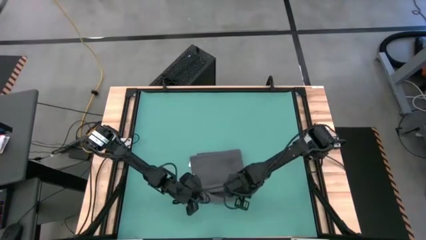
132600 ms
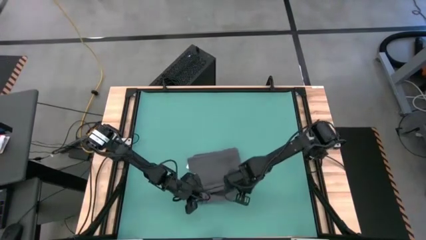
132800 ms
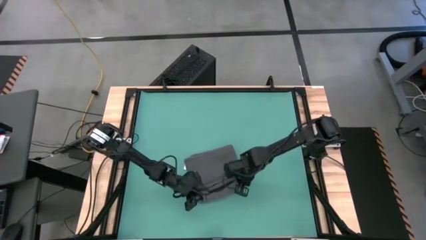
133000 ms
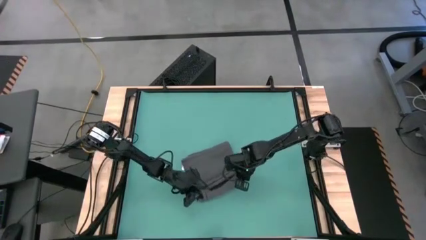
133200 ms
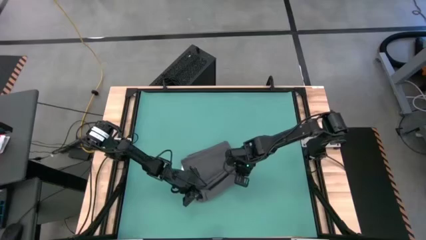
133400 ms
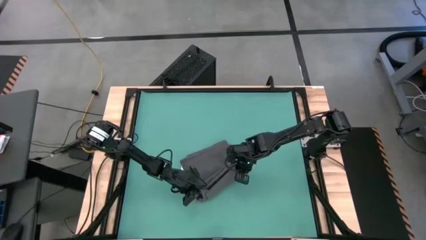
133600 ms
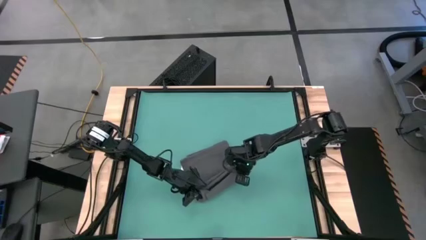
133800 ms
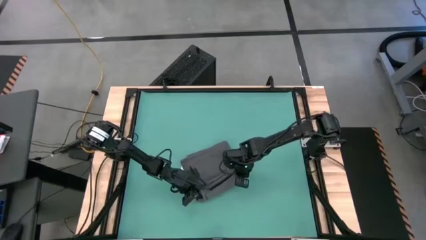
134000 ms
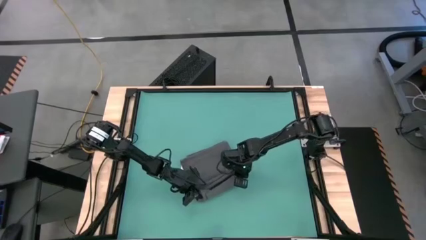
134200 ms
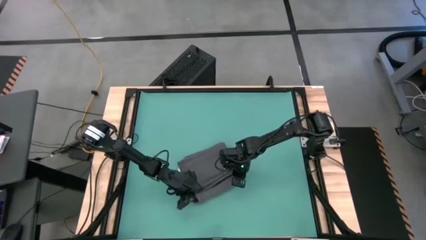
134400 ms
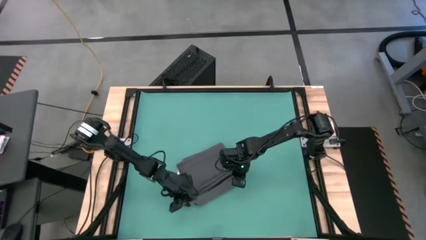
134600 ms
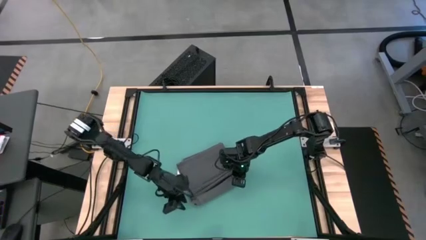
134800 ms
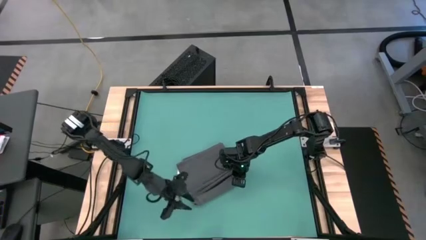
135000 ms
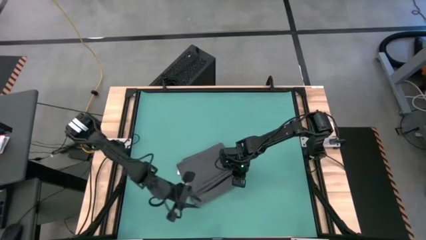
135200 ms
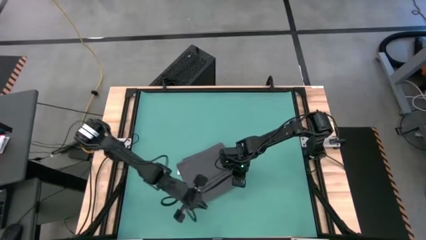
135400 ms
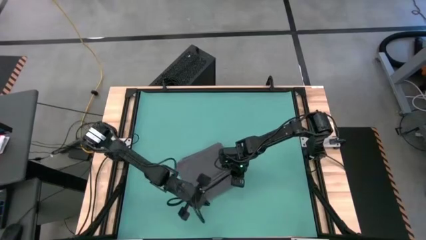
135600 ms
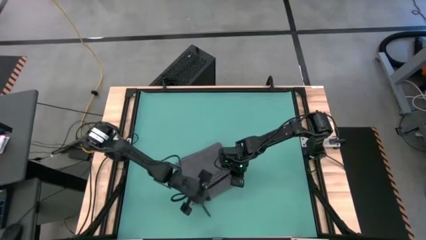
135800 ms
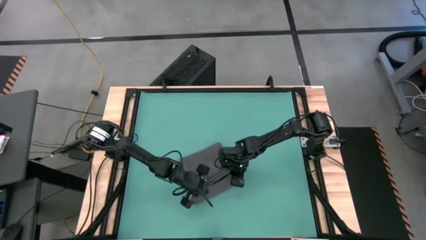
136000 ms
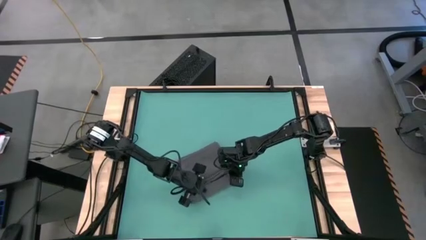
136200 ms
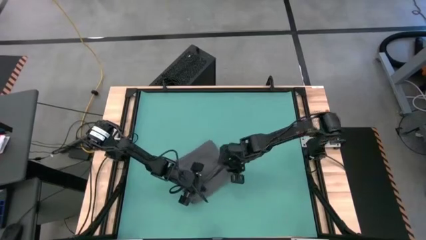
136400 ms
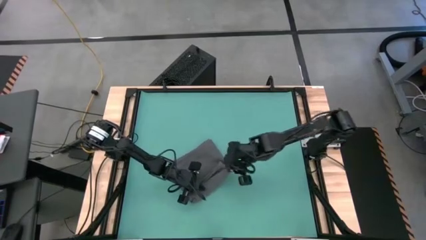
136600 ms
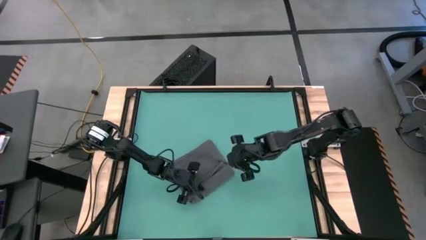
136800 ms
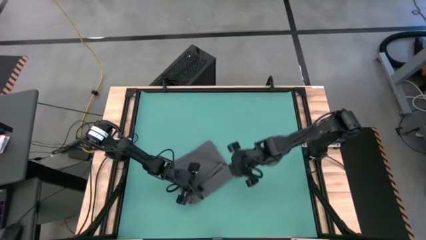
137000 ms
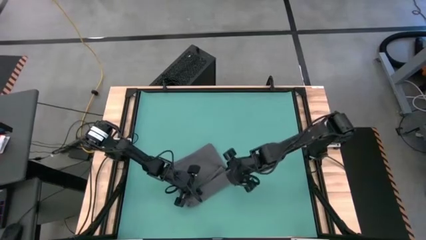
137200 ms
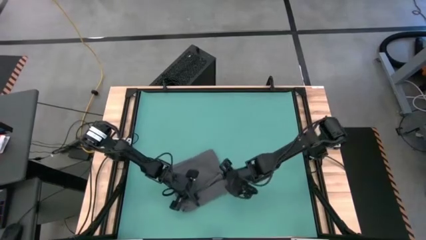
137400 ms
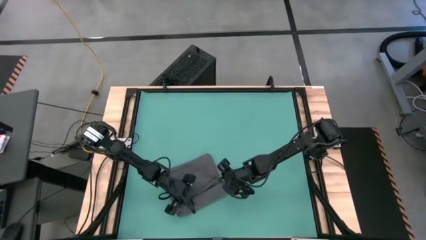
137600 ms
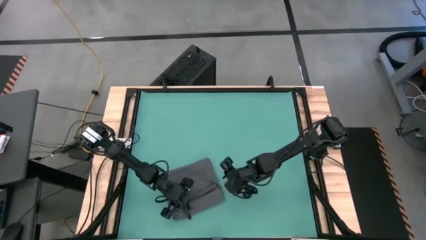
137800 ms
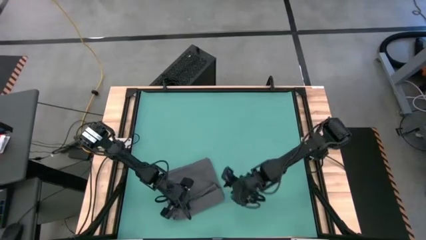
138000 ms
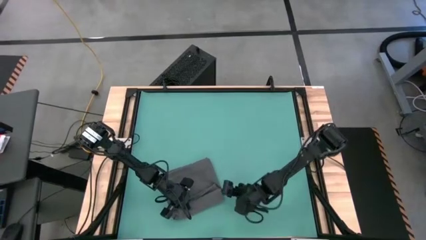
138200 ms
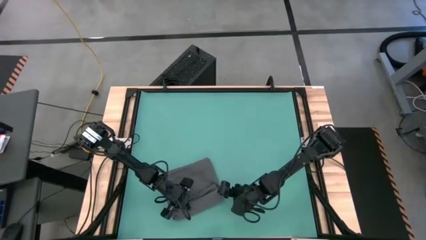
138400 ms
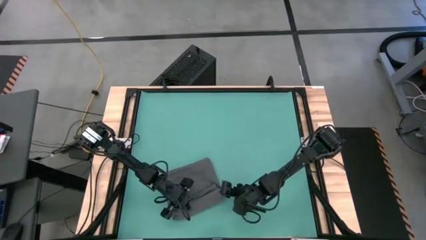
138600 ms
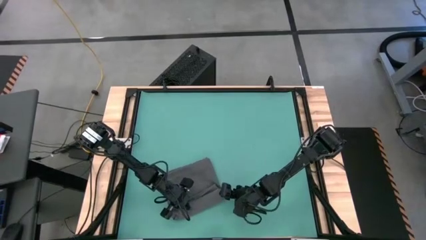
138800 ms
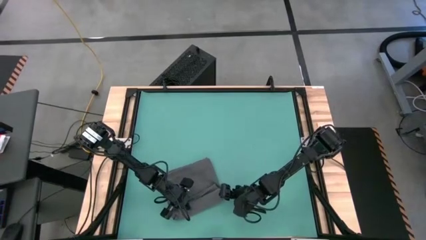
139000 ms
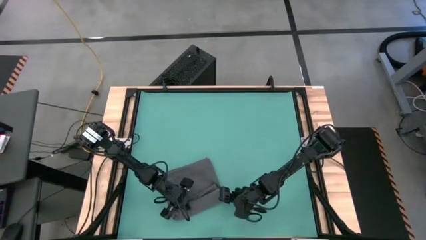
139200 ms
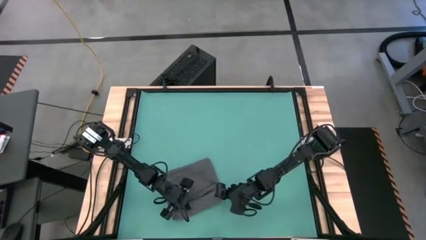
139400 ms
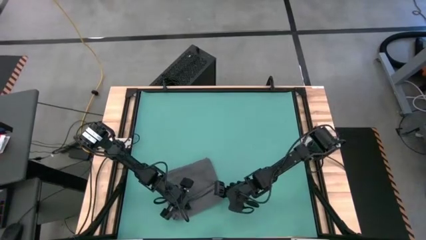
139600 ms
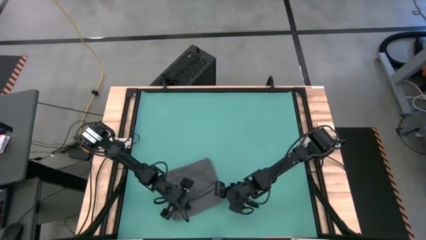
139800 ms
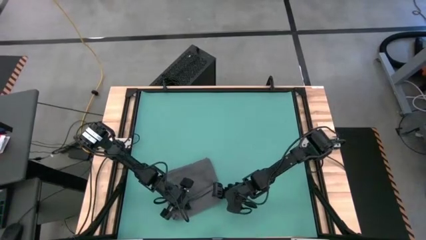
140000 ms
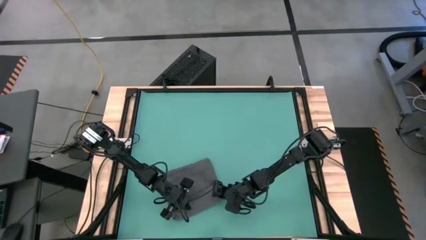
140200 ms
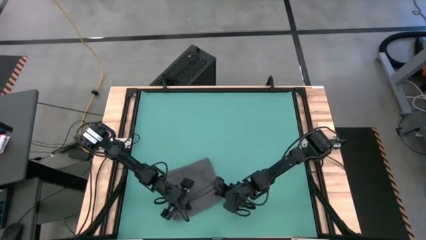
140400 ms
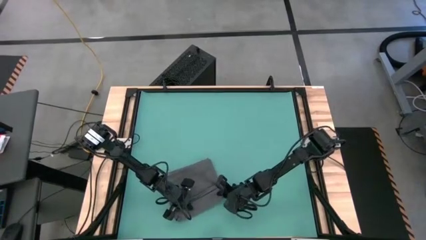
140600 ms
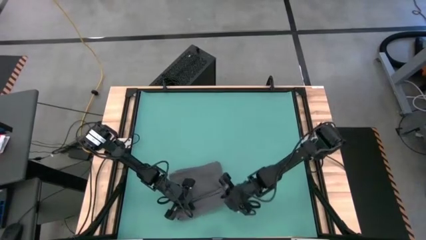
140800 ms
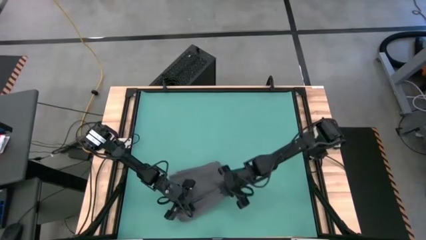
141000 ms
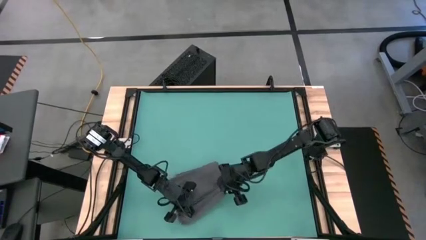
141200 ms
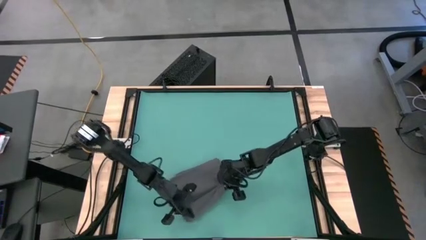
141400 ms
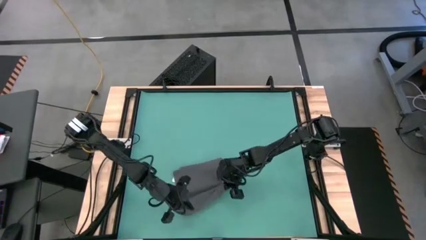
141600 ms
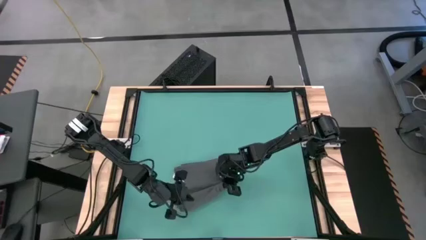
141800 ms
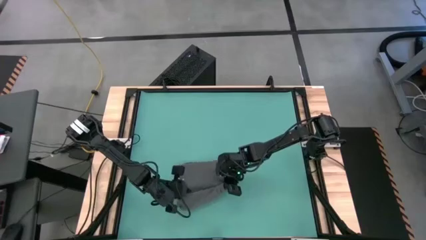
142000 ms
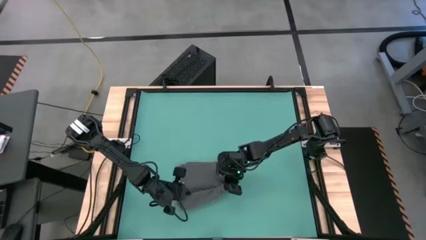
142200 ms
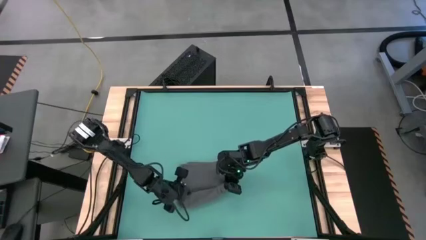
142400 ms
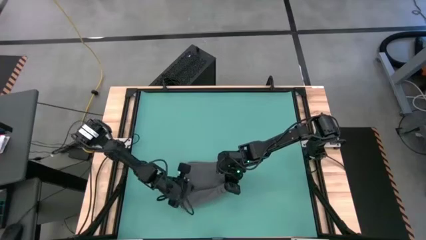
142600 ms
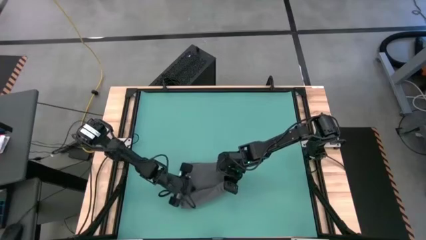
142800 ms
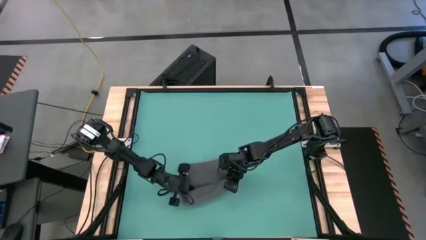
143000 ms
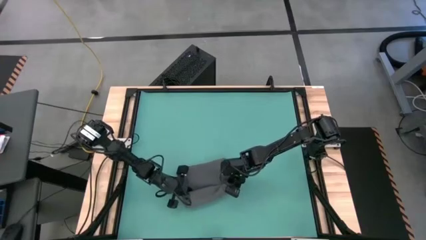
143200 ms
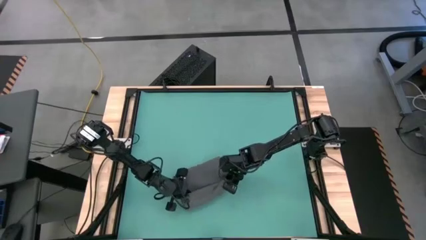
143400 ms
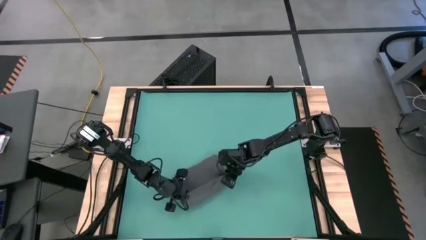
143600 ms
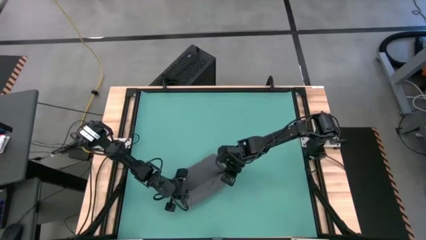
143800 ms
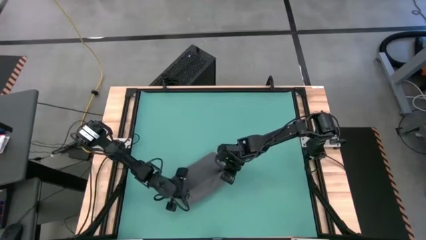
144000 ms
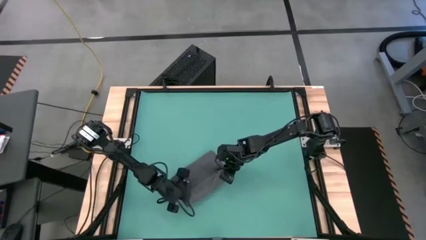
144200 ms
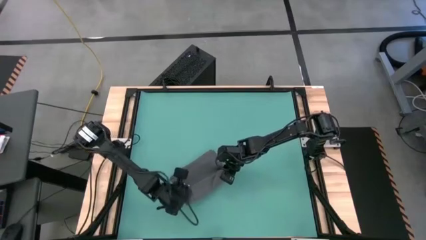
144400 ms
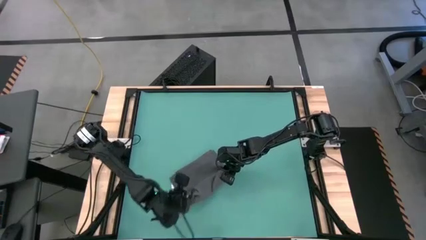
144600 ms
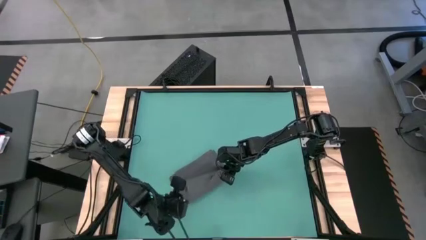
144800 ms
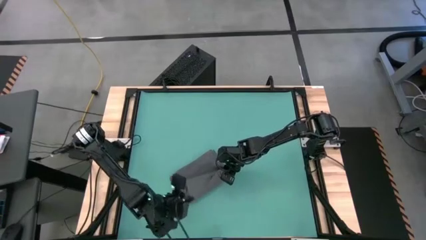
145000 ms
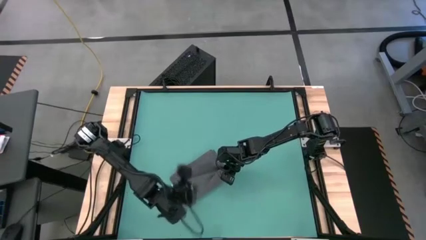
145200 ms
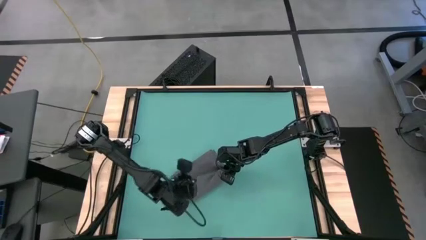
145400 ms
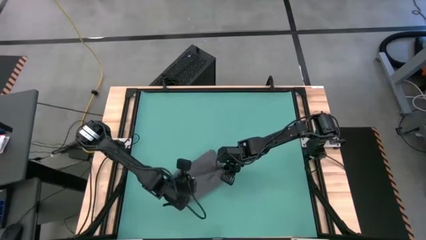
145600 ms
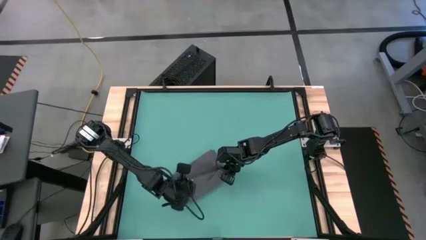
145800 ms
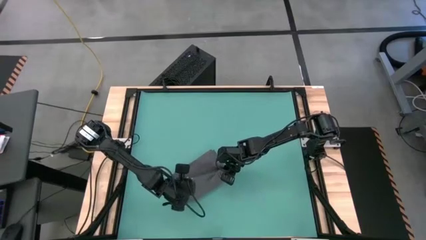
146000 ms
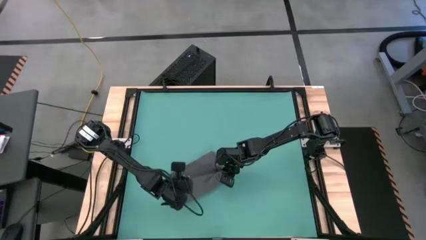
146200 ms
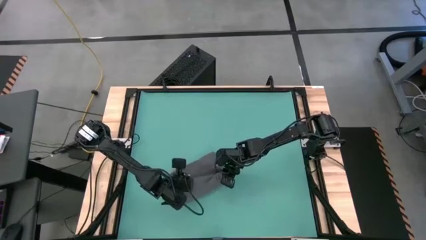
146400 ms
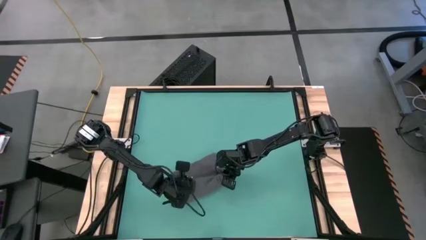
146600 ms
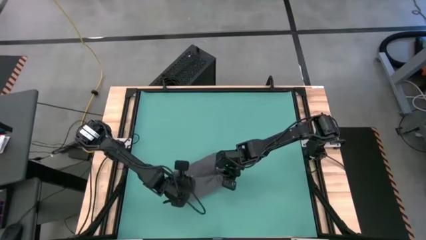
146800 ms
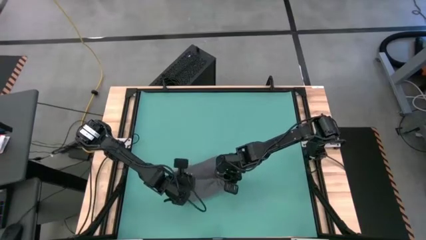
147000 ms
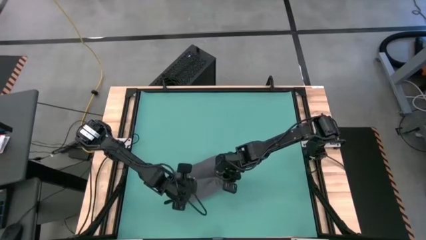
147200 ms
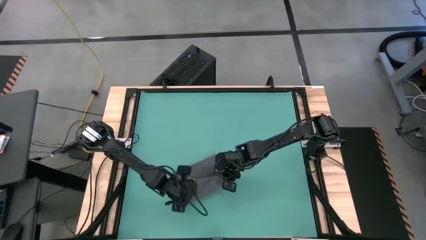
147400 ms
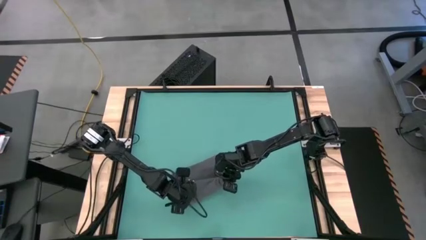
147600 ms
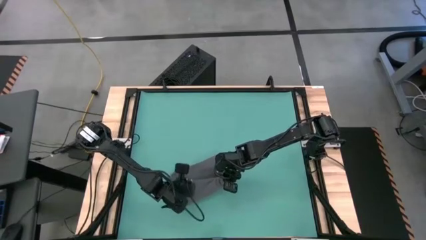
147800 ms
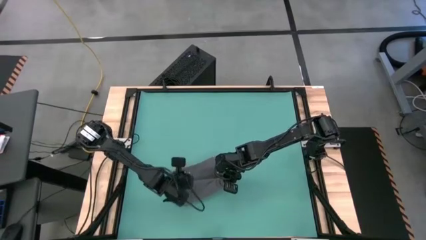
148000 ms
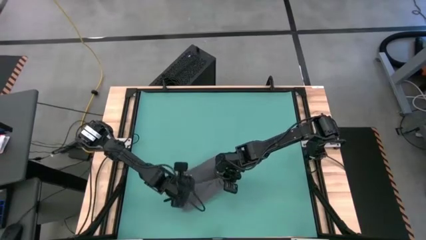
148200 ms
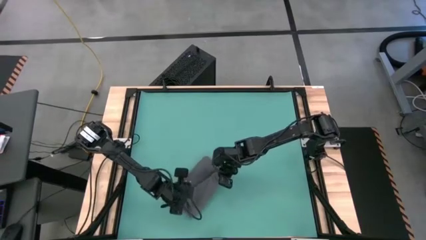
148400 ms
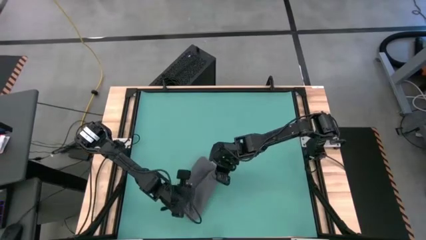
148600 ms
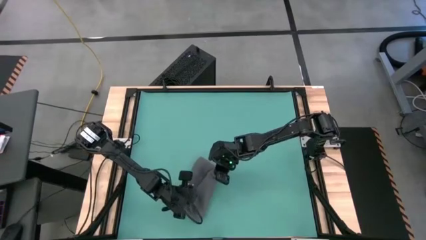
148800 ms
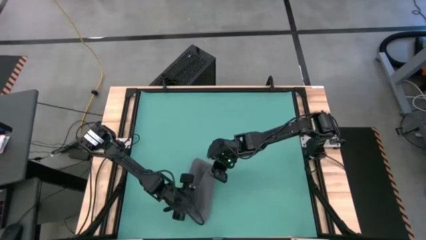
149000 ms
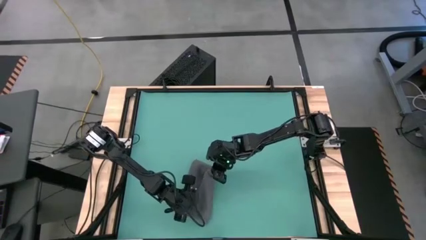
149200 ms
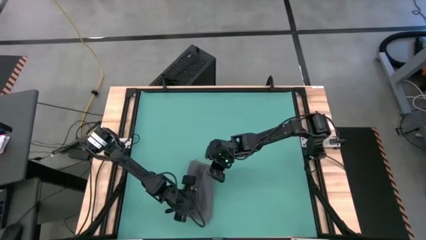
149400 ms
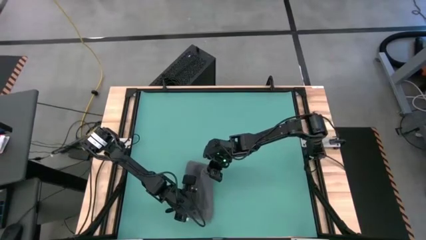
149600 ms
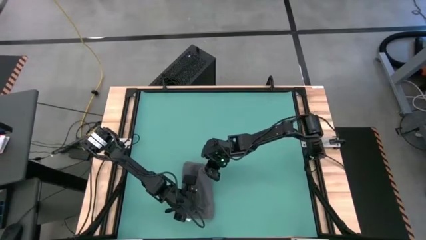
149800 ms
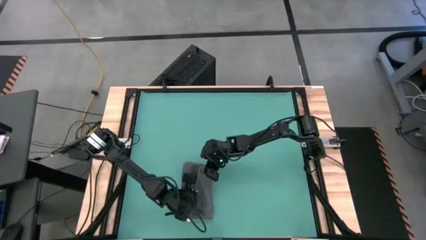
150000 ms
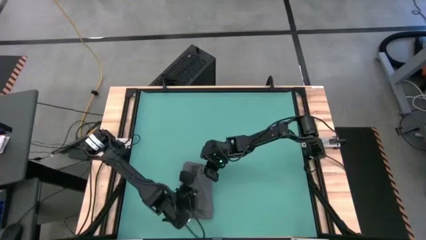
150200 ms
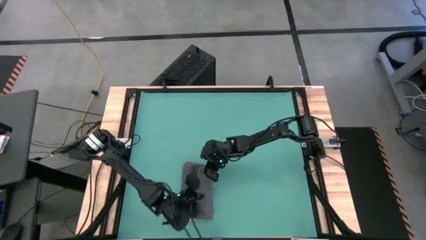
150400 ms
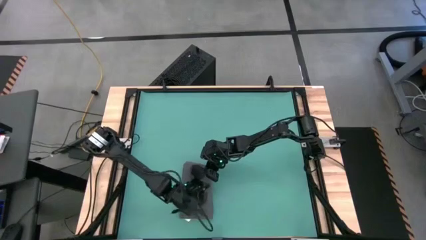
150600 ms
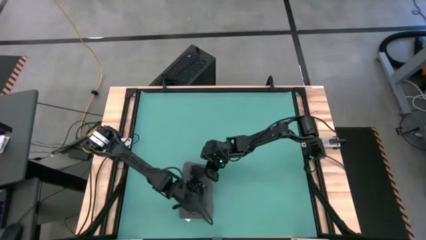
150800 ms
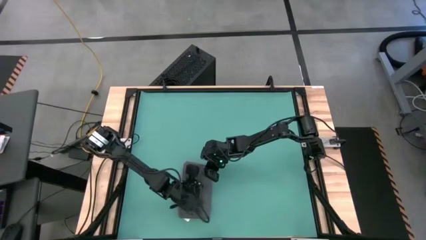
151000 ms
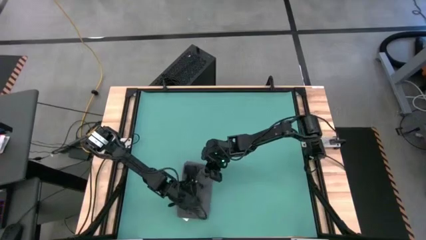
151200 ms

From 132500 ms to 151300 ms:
Task: Roll towel
Roll the gray towel
